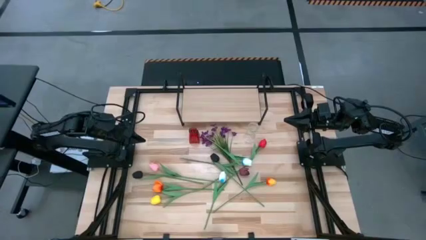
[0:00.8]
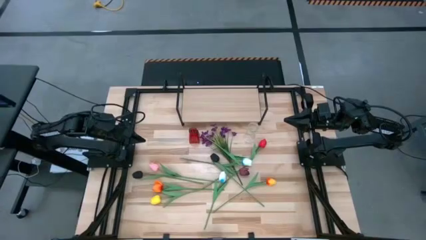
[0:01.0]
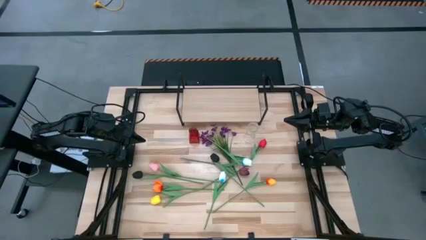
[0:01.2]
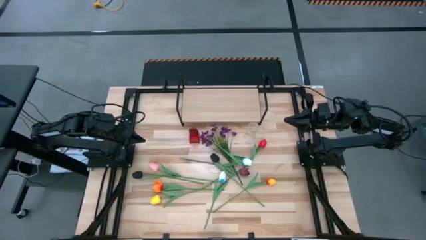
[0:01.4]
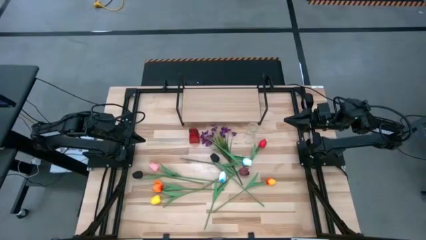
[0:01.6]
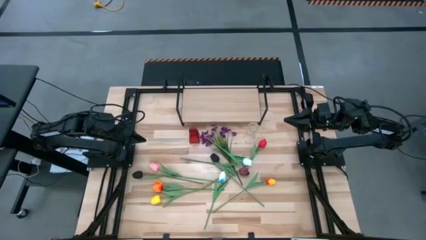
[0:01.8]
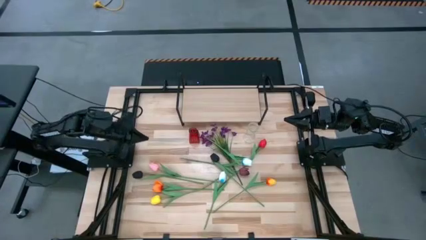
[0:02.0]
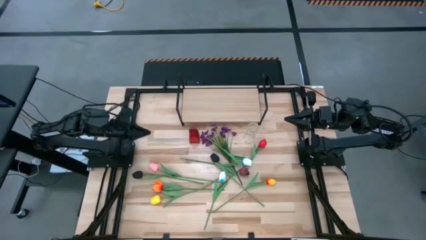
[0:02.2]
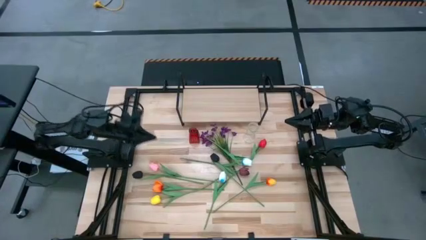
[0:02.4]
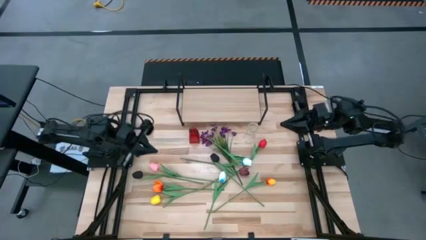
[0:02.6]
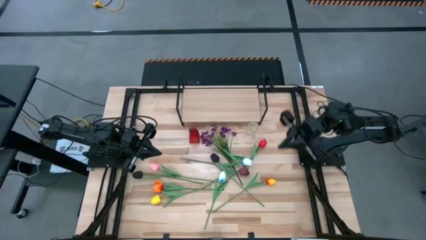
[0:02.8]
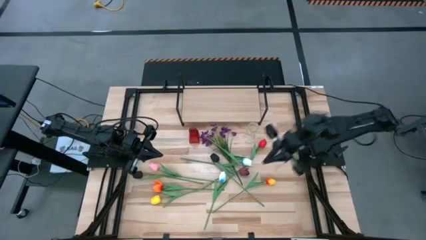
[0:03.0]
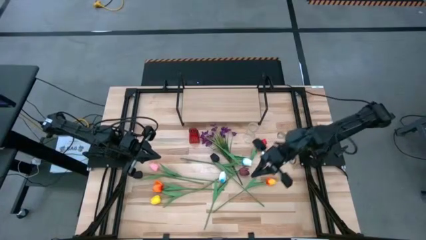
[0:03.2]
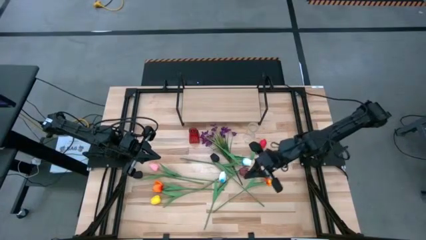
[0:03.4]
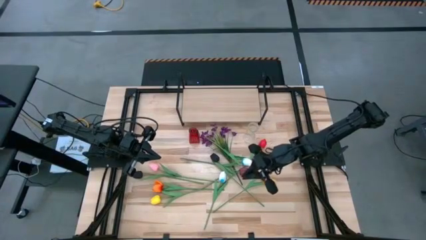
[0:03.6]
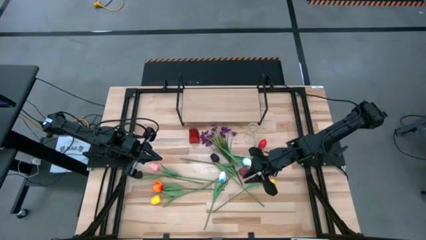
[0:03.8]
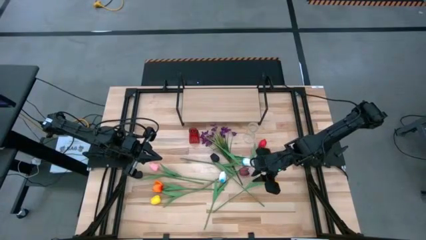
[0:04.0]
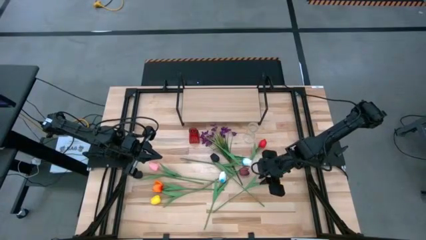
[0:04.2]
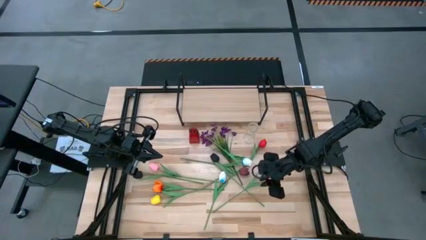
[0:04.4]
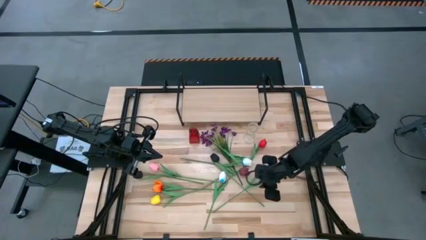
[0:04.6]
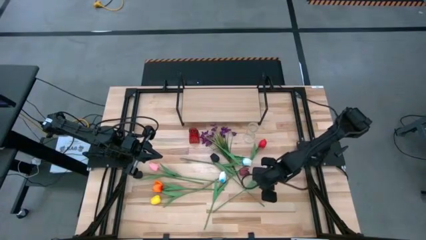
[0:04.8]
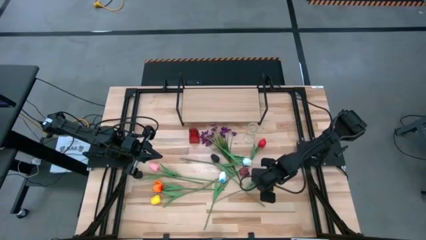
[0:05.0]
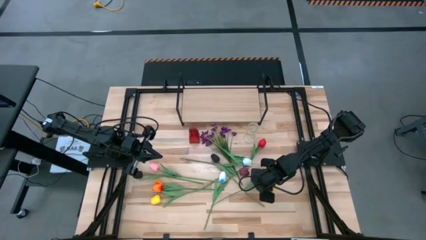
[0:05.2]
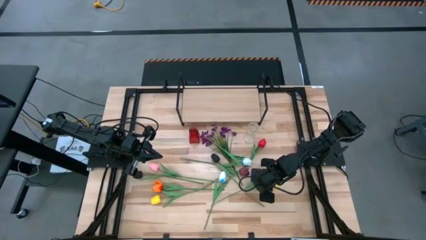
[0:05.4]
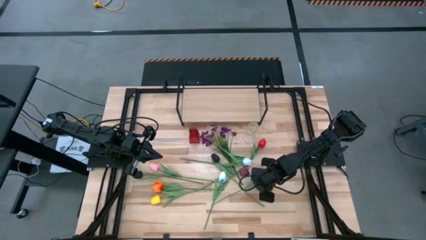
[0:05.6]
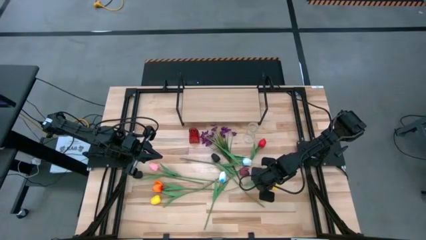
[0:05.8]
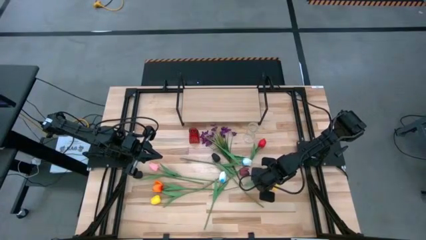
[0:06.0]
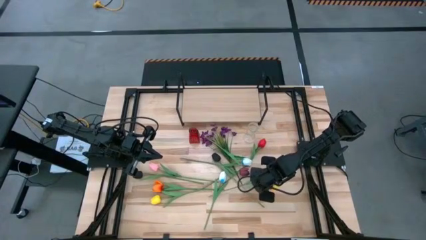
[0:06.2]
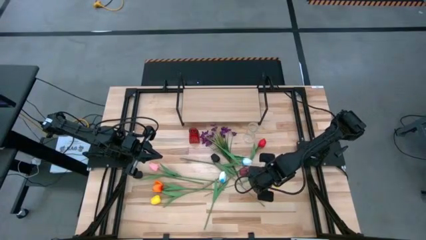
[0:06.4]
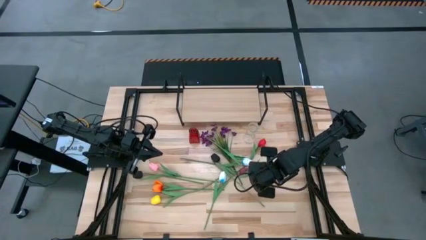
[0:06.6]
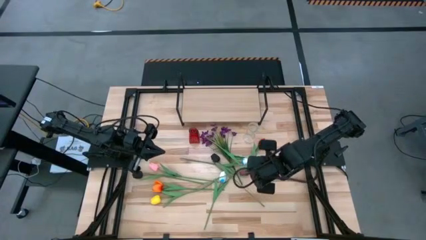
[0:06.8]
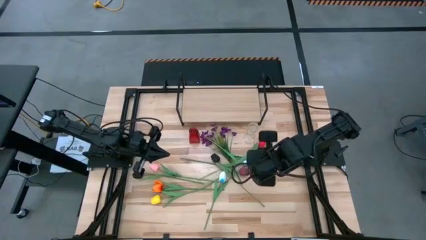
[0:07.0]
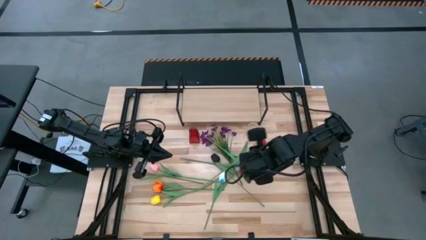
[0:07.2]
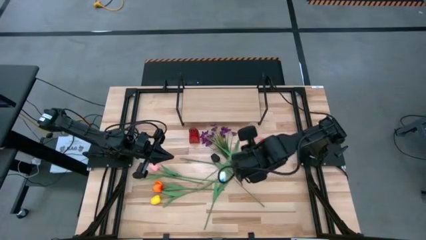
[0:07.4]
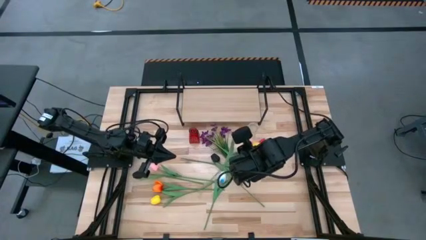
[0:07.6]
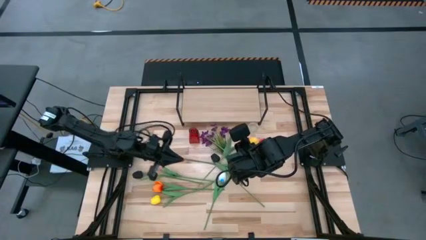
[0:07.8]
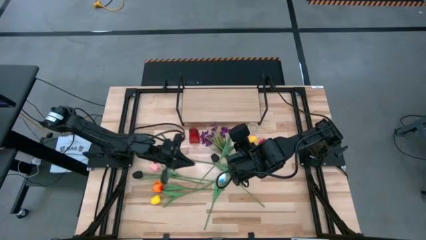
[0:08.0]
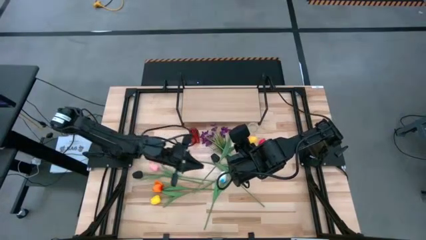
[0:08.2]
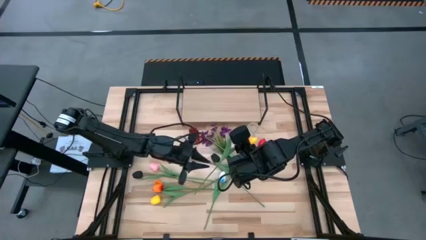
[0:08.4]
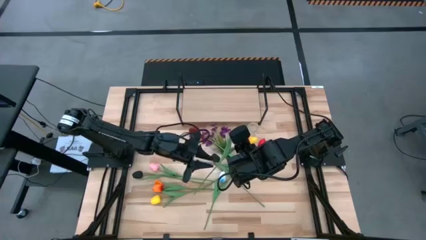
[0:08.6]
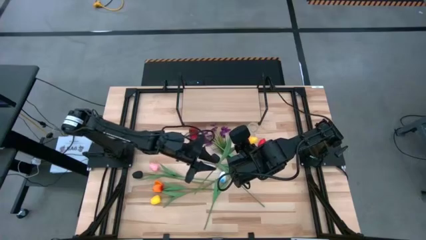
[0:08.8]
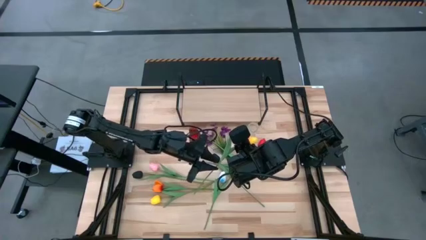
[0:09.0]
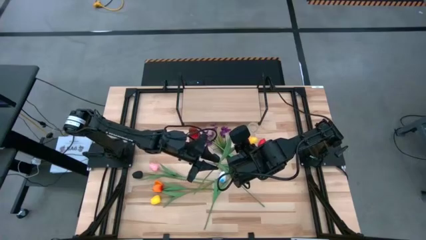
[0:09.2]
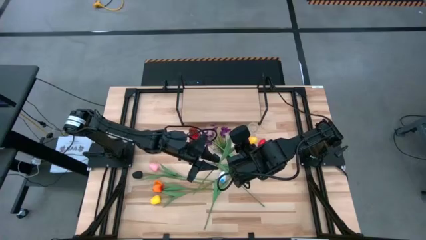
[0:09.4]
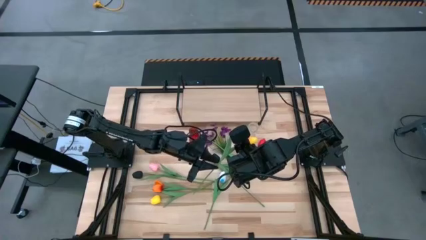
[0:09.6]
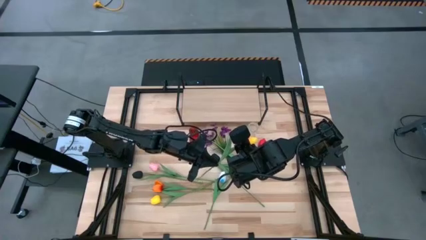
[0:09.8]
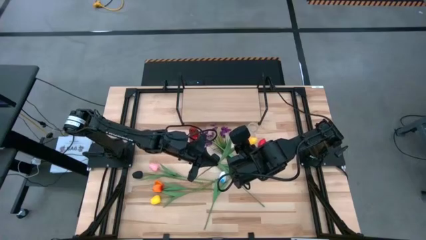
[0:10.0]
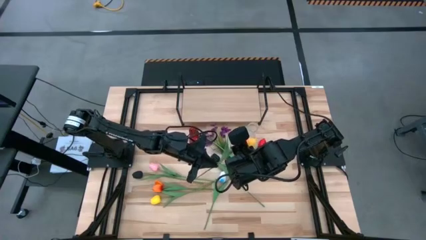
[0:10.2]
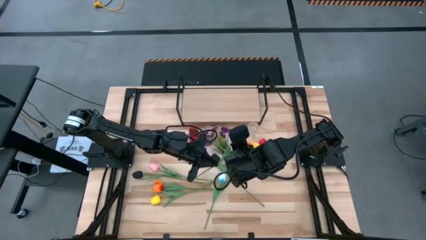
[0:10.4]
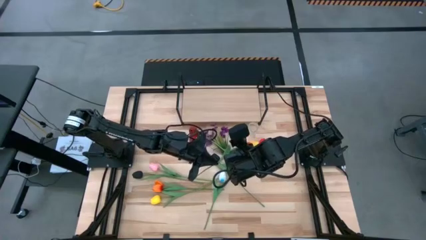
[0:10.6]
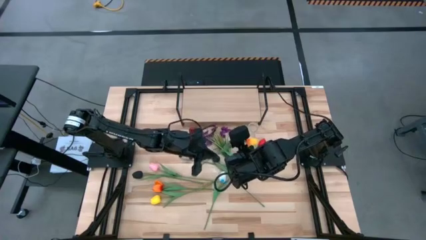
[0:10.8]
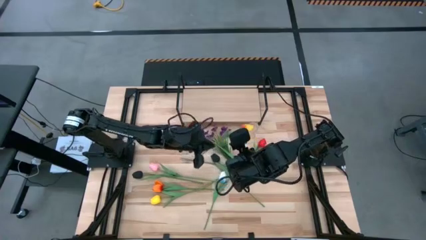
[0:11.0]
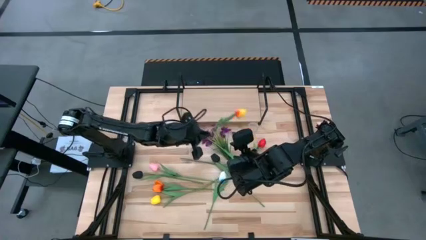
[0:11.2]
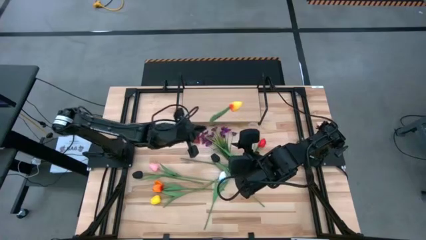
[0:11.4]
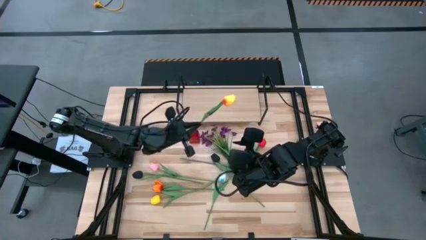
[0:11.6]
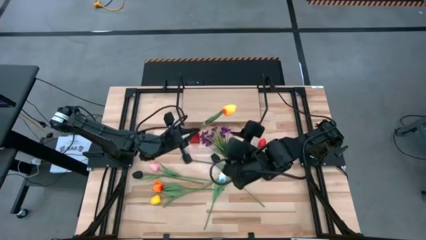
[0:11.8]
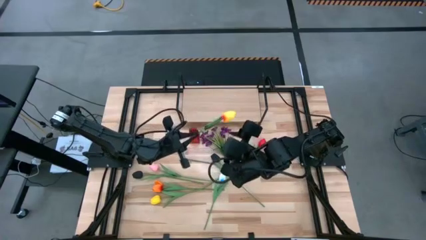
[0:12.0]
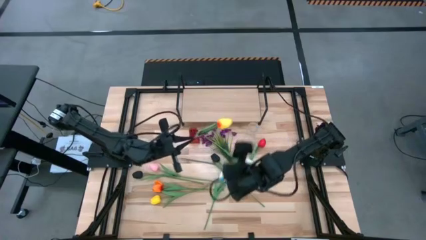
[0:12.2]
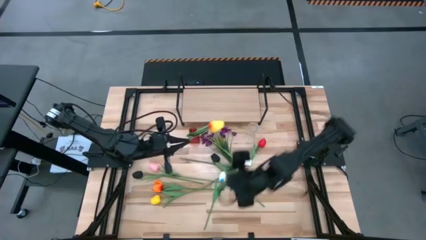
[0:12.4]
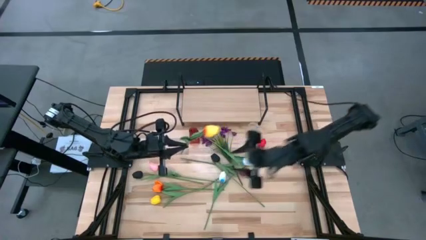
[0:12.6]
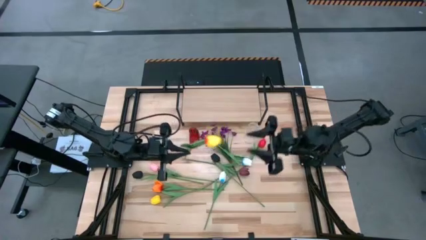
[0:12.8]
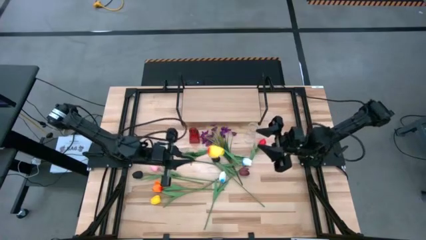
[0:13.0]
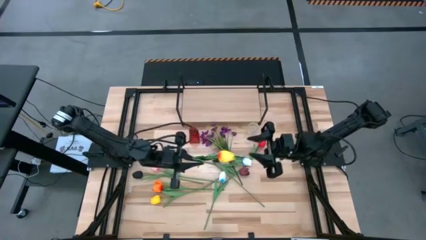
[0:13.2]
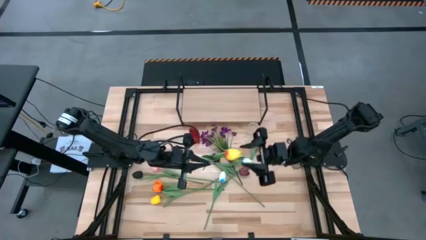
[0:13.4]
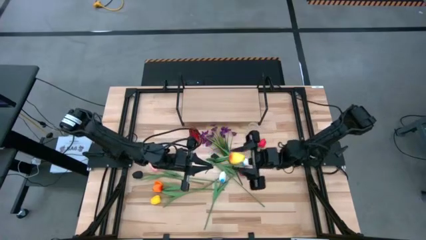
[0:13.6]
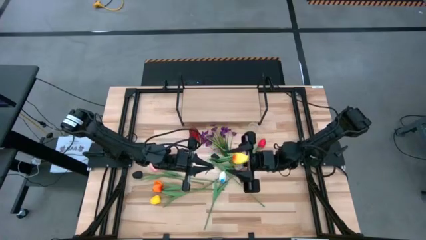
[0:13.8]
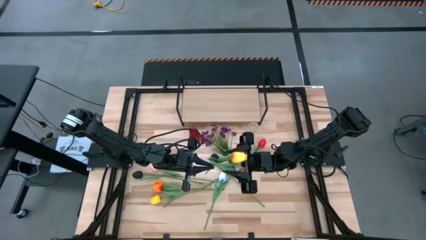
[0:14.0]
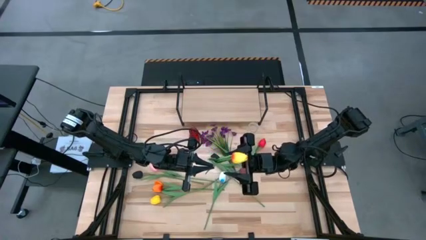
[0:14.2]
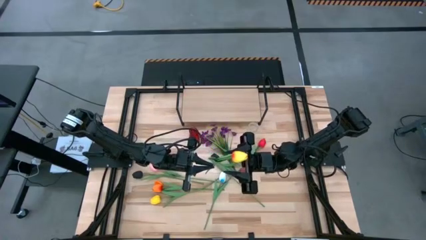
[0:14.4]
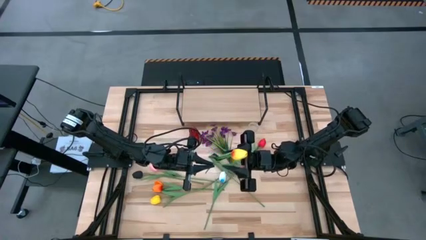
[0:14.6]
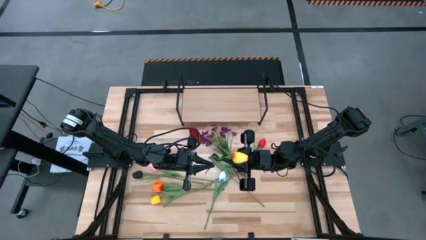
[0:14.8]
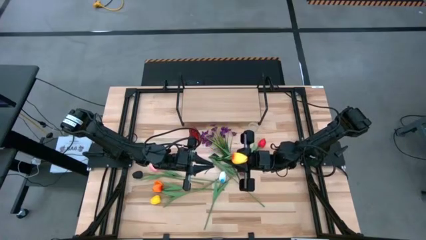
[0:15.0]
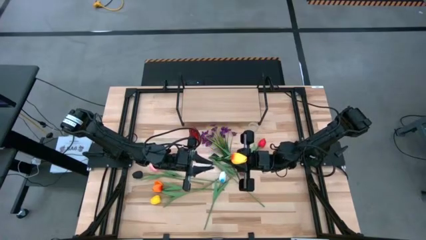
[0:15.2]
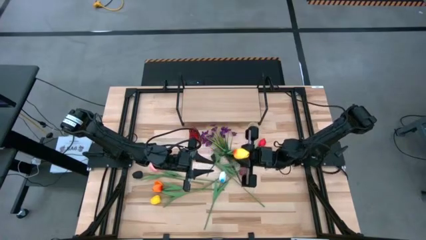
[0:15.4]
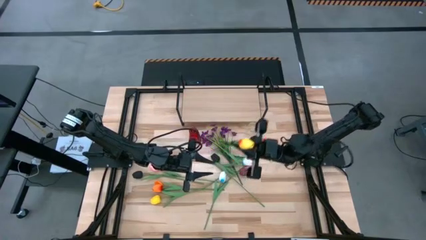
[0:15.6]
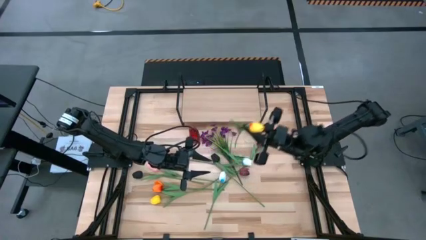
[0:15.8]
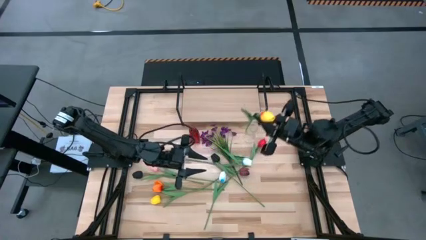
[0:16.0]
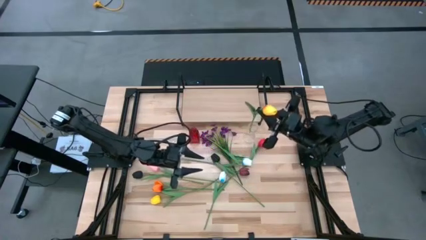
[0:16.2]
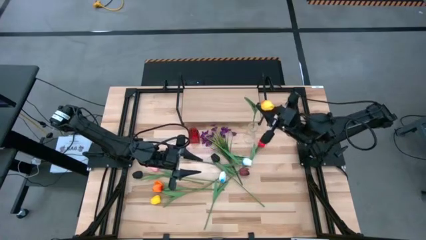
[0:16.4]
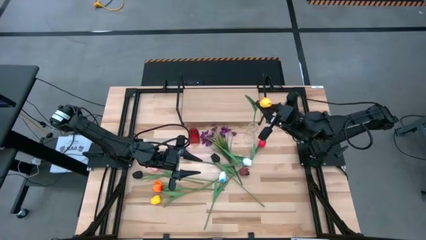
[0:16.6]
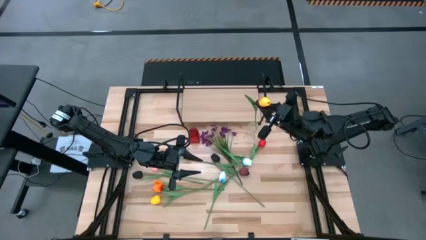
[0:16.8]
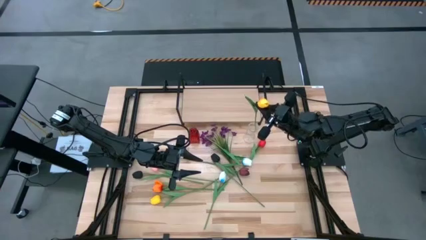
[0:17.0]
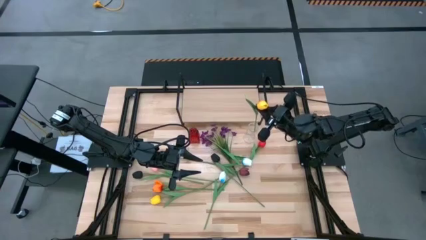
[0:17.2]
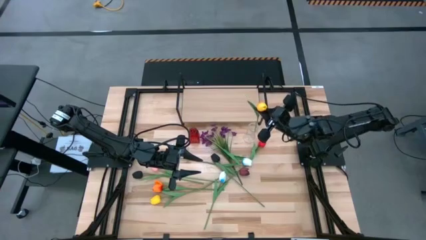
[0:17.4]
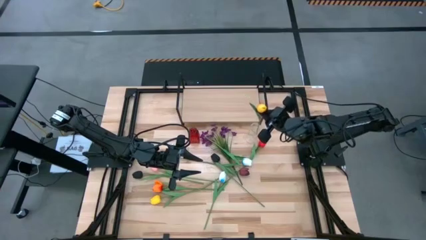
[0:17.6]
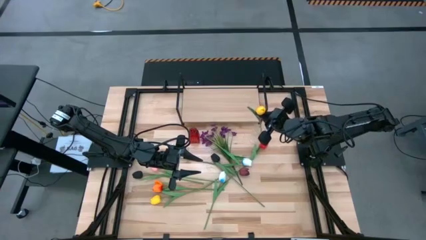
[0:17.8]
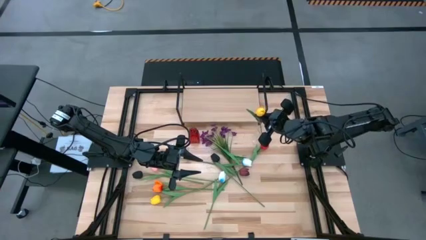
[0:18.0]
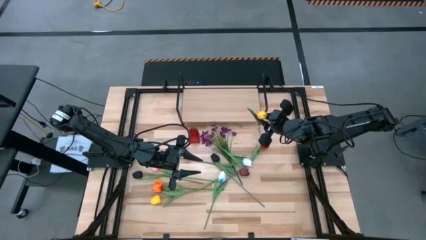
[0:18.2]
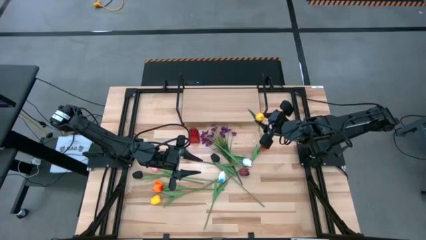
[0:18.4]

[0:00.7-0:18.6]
Task: Pick and place flowers into a vace then onto a shelf
Put the yellow flower into the transparent vase
